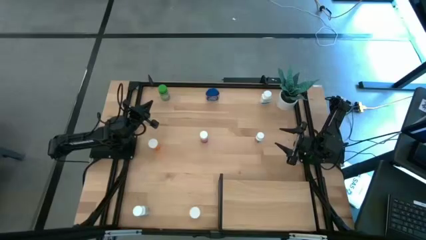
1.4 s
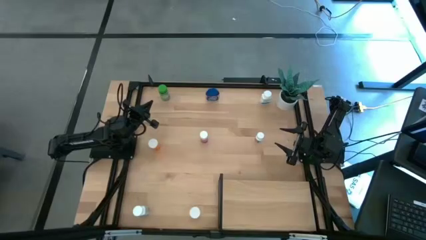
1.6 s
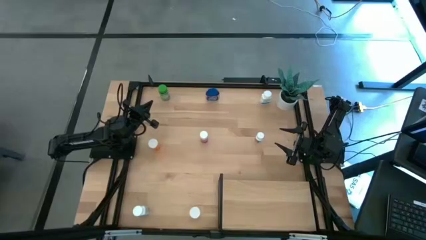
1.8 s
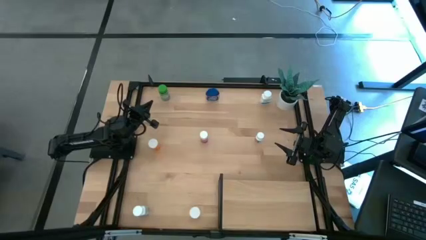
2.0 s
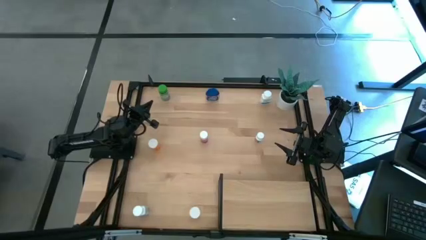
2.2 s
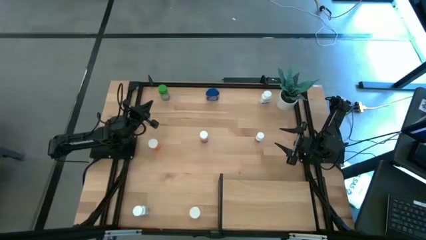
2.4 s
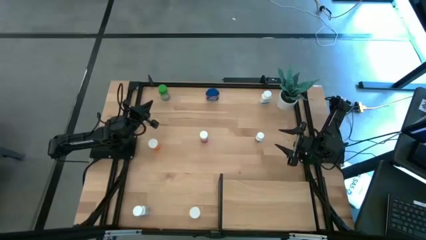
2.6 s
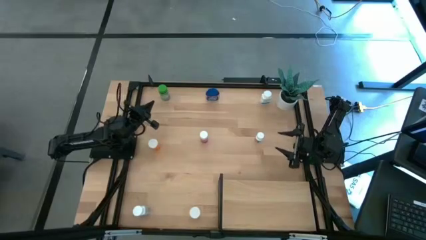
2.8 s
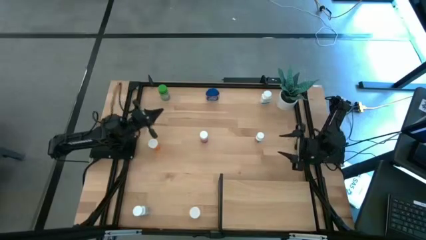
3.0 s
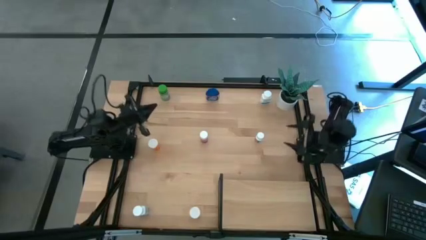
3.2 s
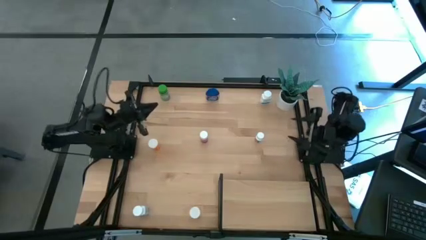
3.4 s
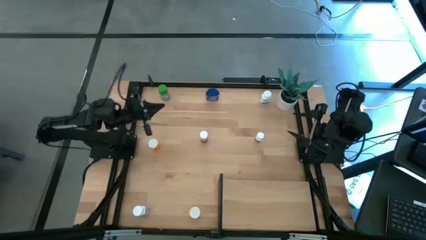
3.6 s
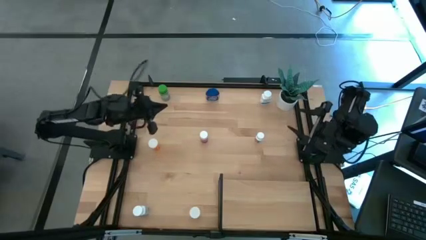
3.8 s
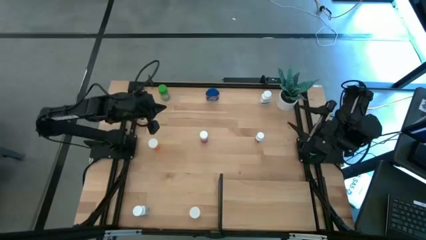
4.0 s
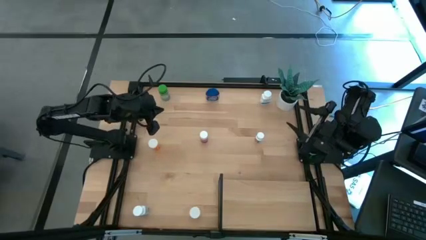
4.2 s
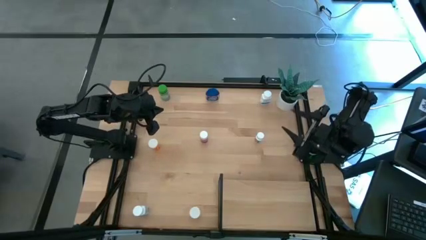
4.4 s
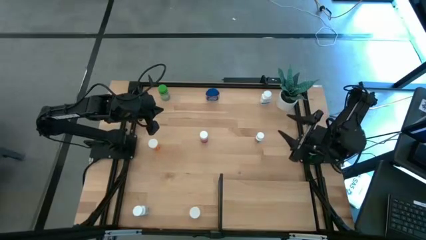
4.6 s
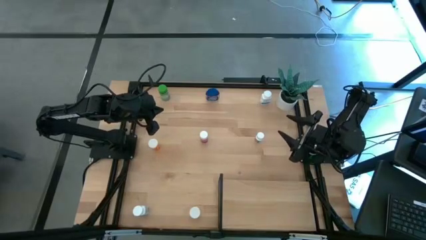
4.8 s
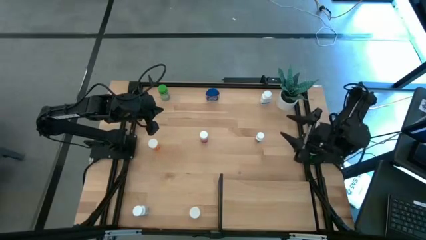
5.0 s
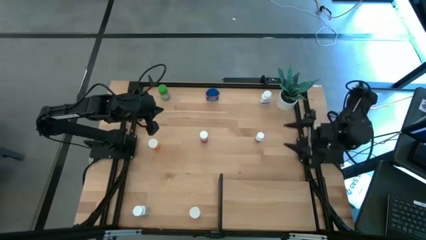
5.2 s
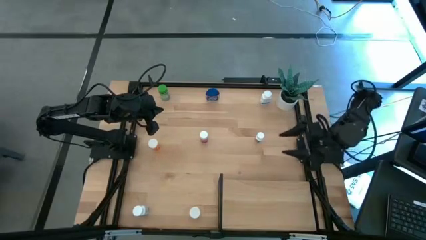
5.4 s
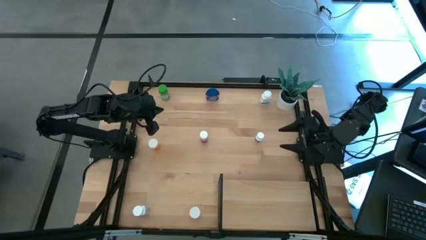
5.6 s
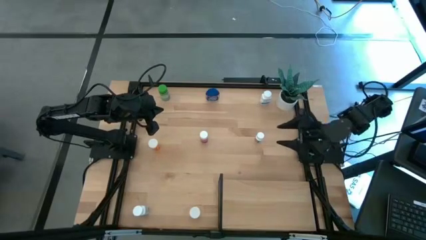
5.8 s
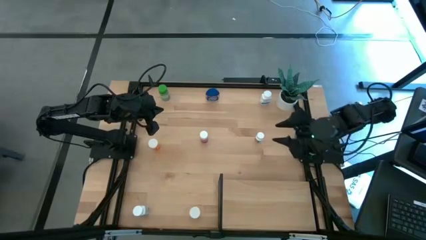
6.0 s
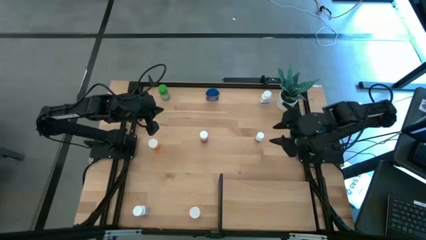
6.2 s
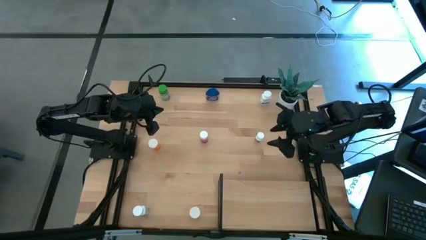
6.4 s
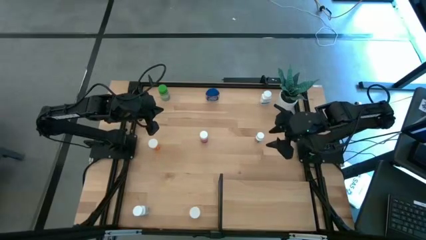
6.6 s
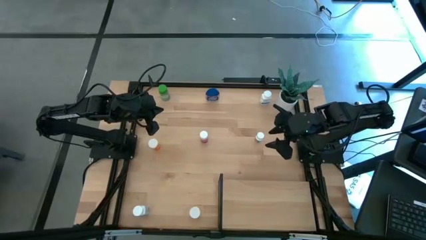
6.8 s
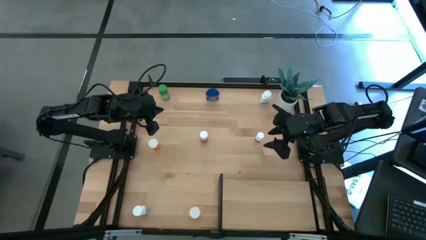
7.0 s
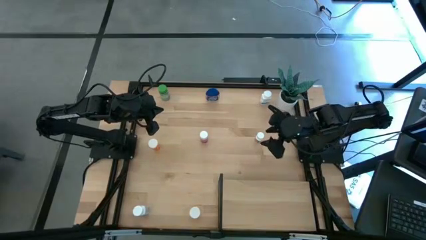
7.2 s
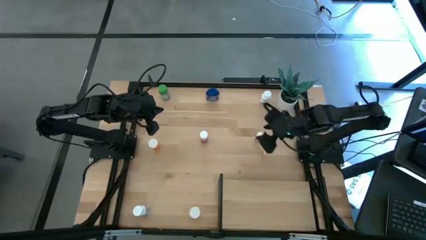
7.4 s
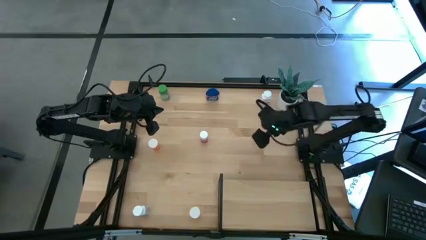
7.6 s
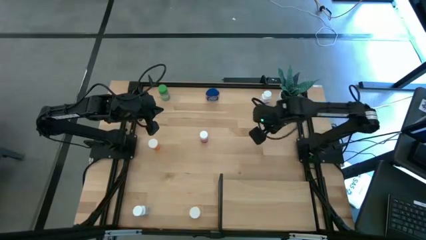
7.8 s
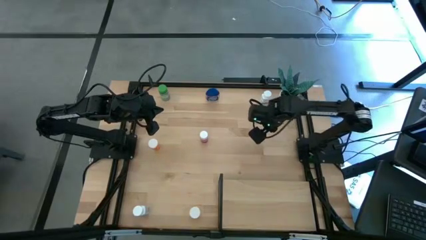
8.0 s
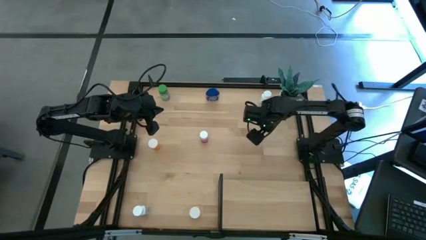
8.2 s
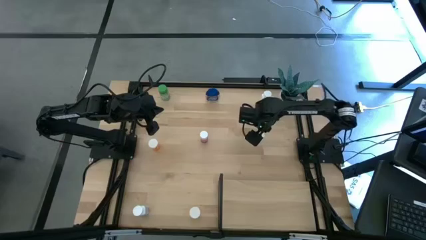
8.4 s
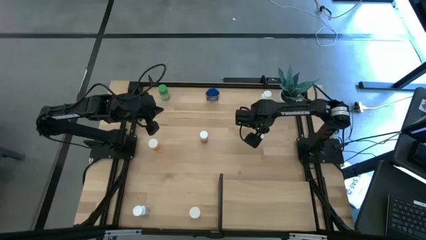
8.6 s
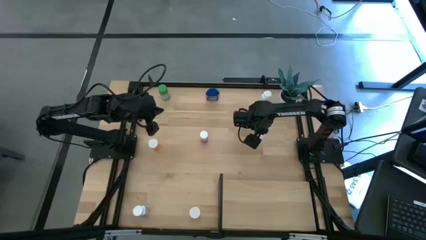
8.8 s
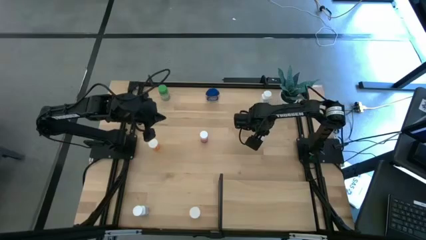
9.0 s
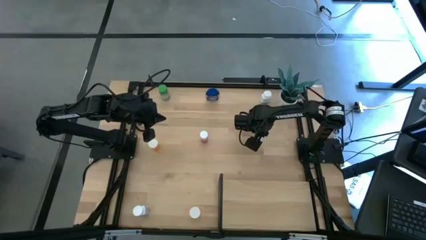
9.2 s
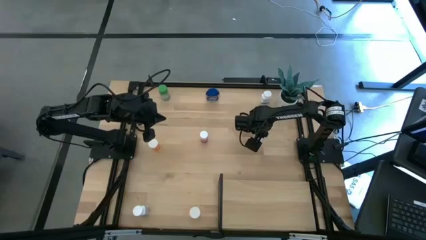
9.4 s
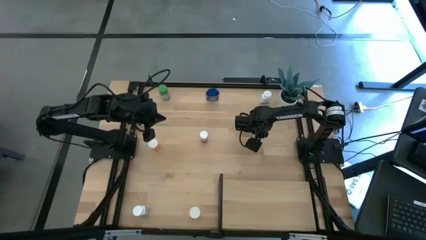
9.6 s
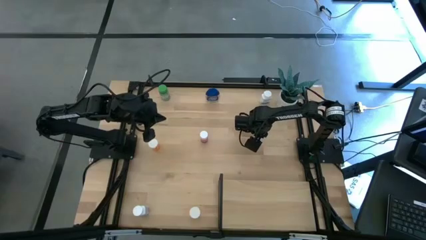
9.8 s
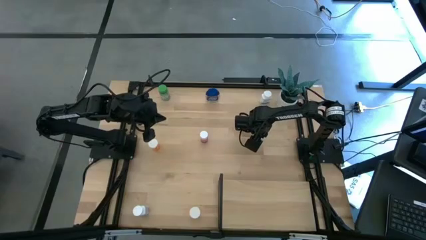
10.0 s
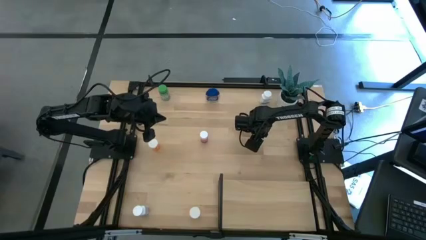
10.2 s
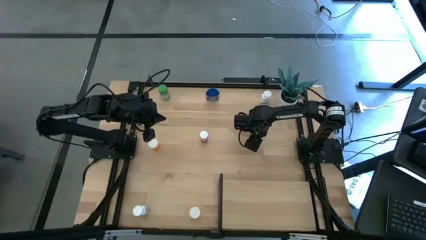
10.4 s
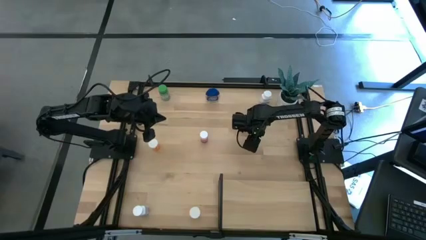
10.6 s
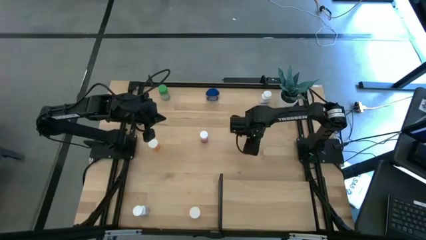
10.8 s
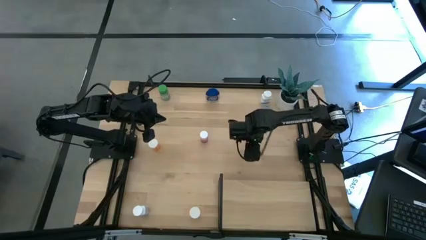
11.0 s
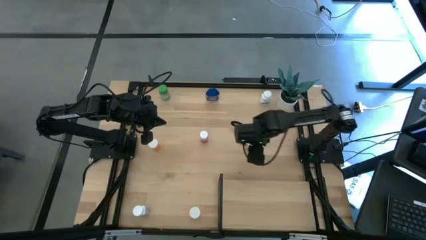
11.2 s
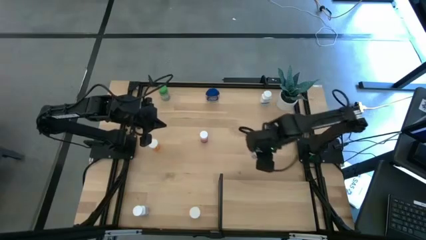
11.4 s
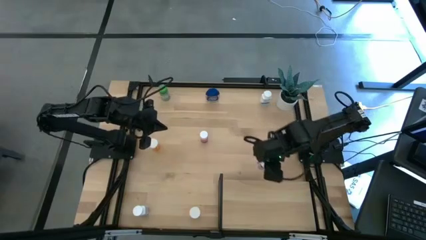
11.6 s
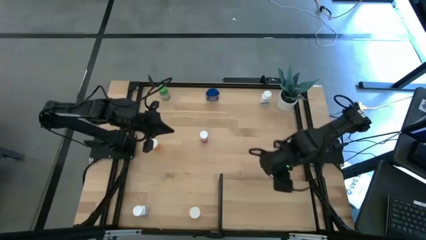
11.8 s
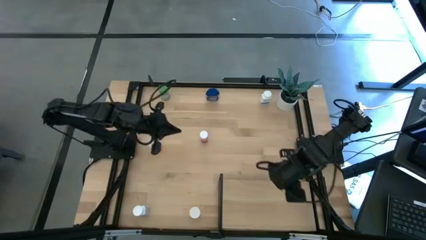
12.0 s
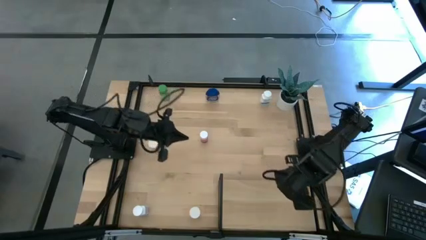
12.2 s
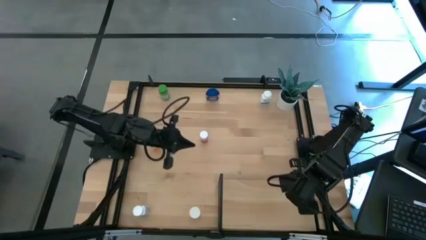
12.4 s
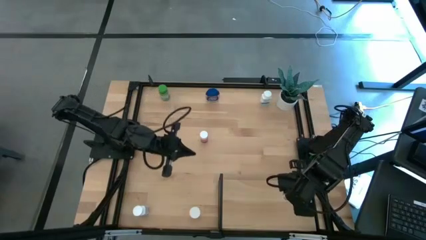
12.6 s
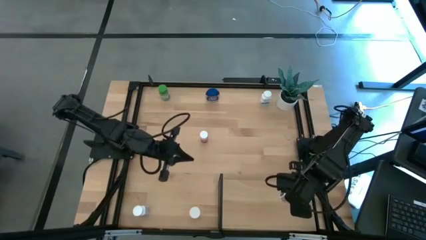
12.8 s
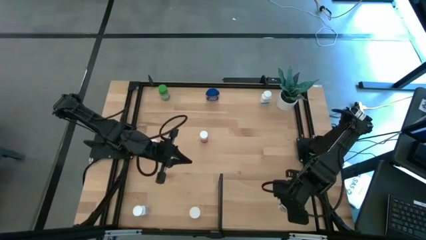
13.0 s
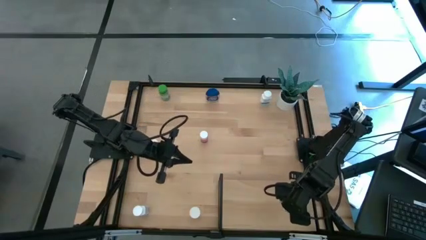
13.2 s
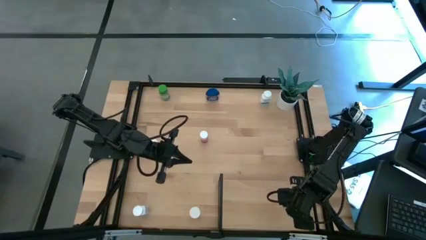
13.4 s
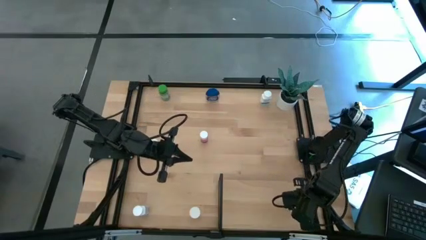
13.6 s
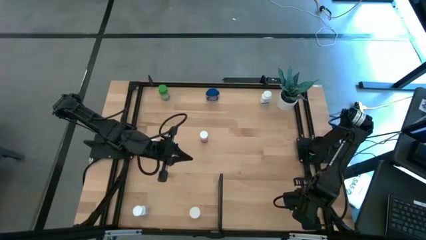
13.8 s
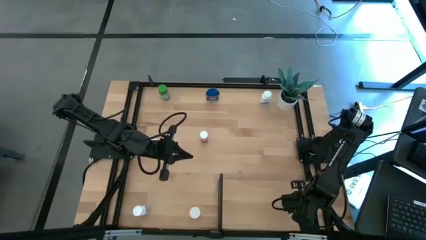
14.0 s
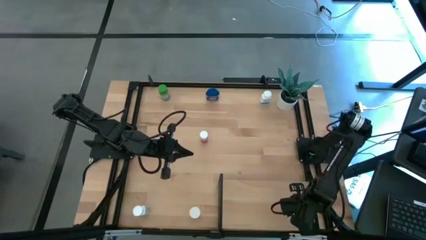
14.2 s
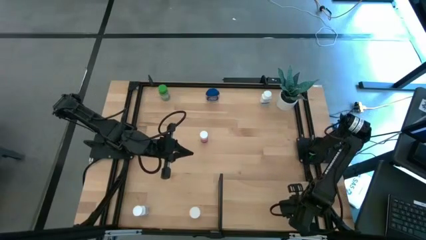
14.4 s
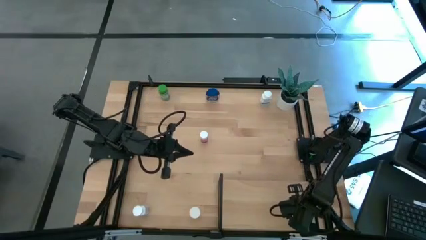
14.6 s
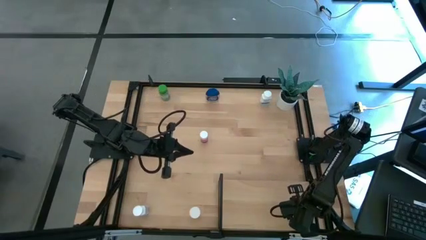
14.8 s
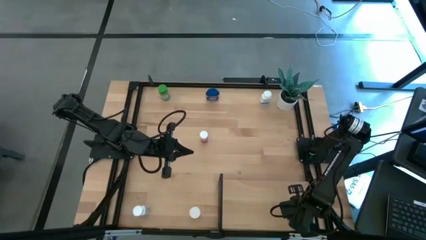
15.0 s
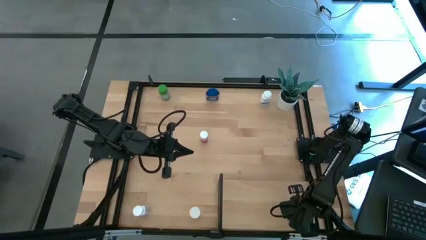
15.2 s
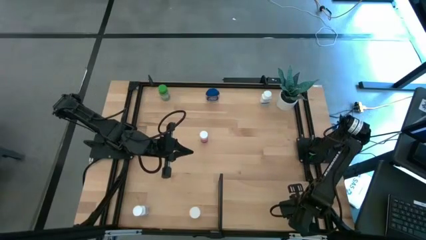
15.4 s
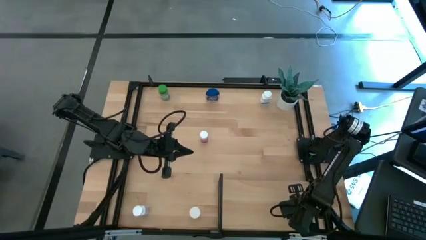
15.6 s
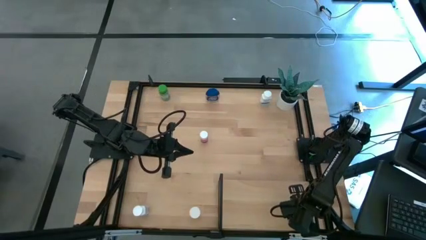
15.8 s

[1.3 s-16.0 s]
Task: Pick and place medicine bottles onto shelf by color
Put the middle right white pill bottle onto the shelf
